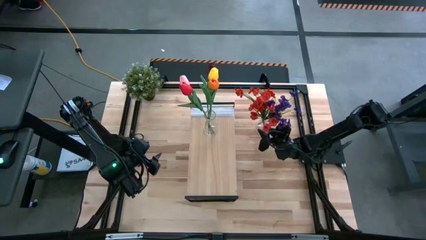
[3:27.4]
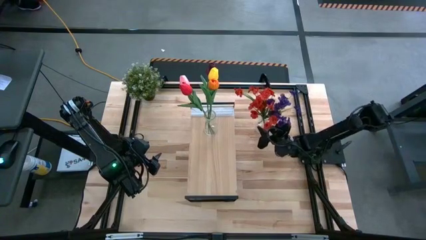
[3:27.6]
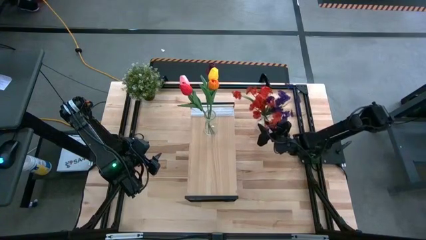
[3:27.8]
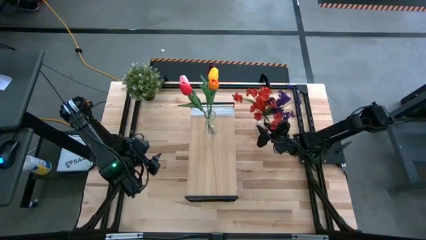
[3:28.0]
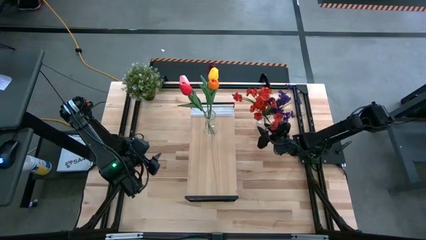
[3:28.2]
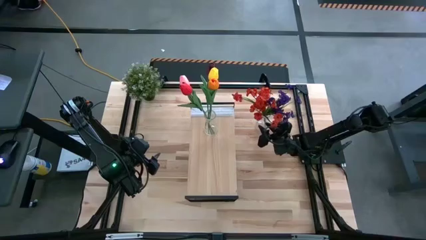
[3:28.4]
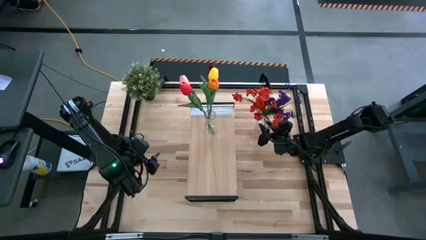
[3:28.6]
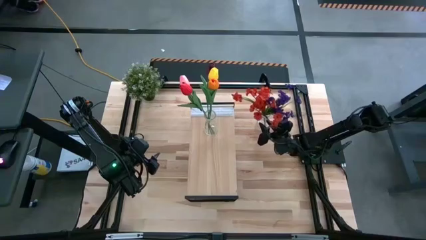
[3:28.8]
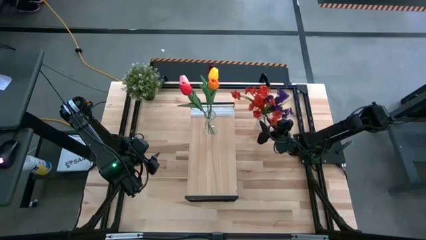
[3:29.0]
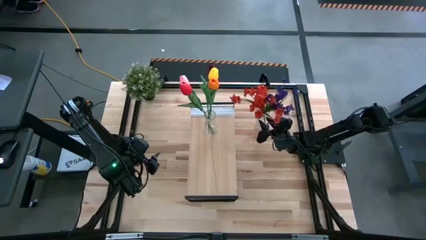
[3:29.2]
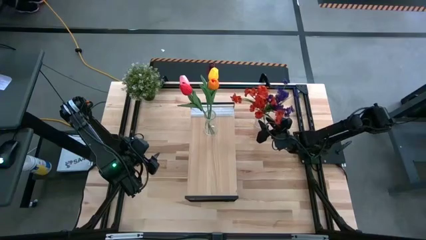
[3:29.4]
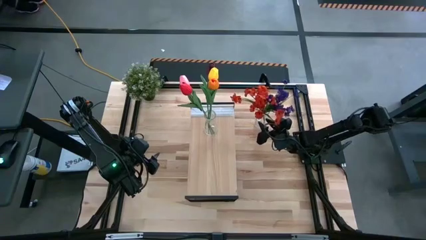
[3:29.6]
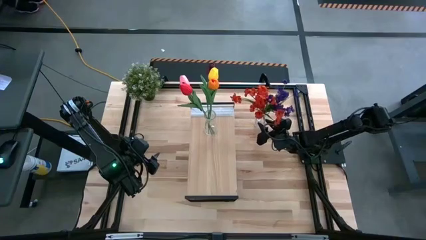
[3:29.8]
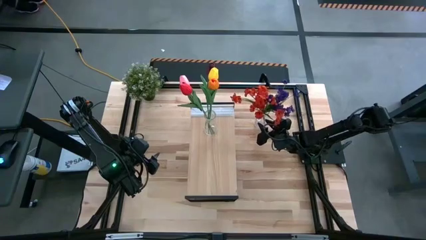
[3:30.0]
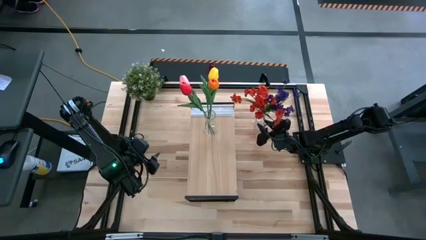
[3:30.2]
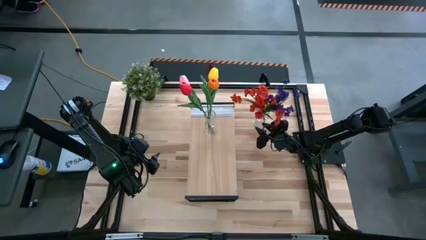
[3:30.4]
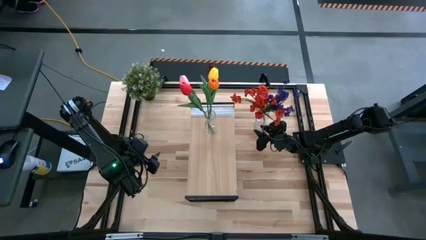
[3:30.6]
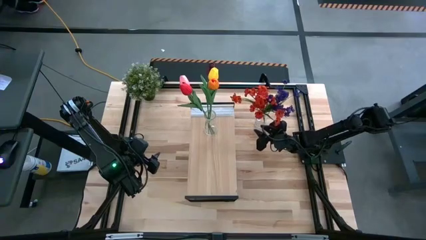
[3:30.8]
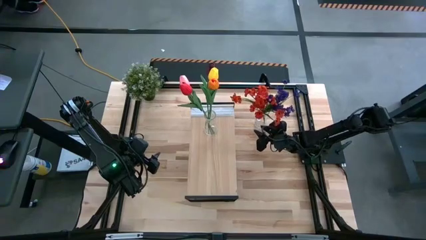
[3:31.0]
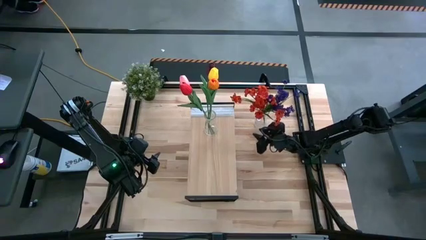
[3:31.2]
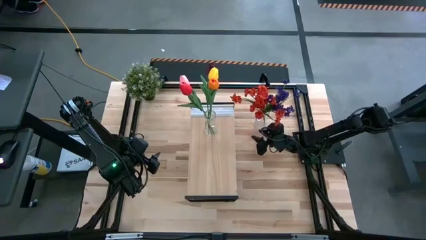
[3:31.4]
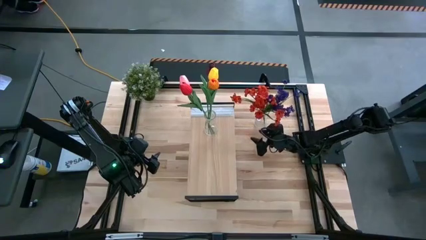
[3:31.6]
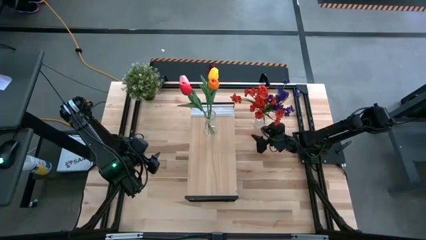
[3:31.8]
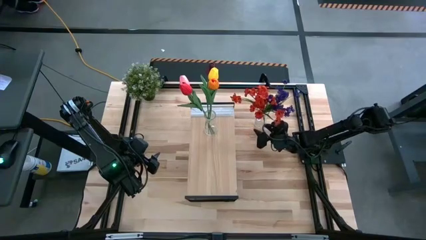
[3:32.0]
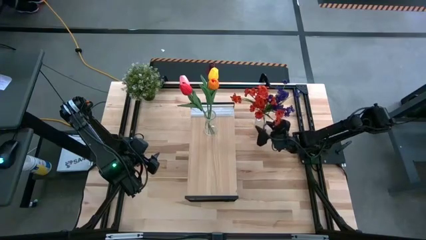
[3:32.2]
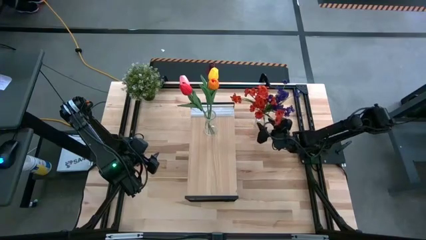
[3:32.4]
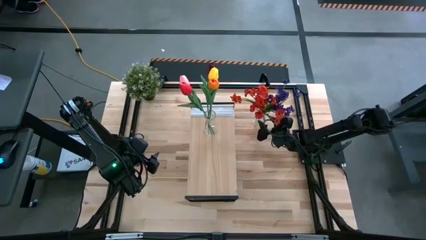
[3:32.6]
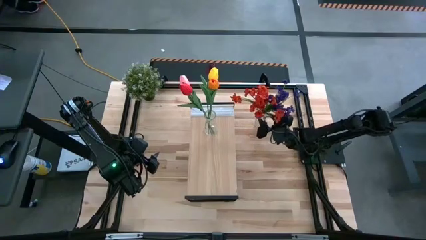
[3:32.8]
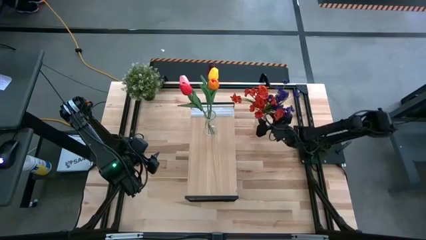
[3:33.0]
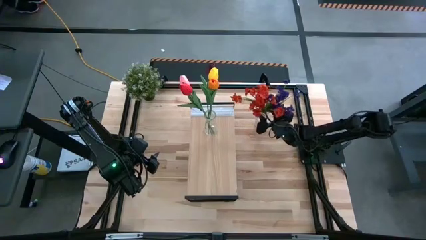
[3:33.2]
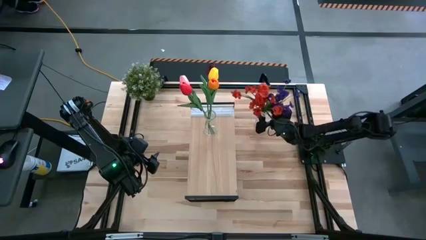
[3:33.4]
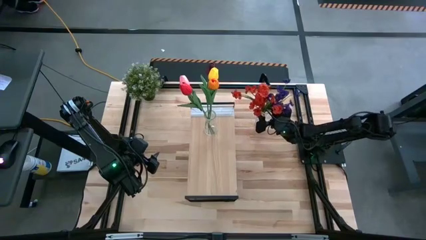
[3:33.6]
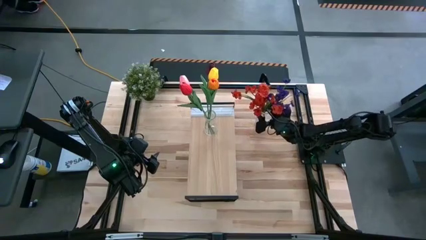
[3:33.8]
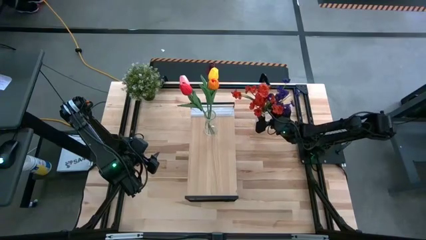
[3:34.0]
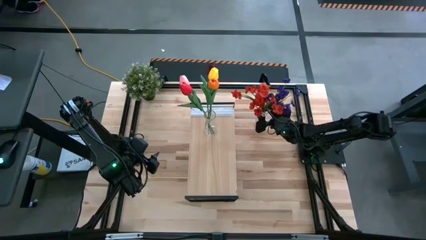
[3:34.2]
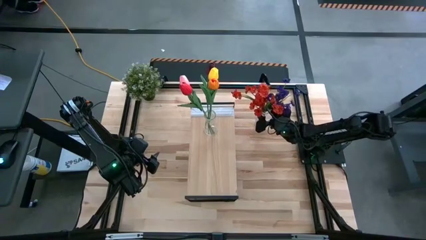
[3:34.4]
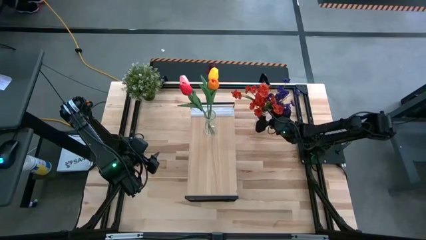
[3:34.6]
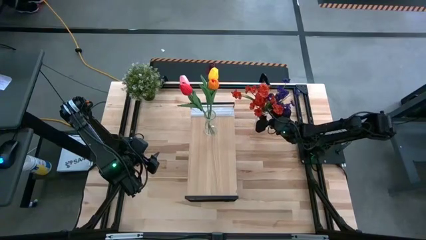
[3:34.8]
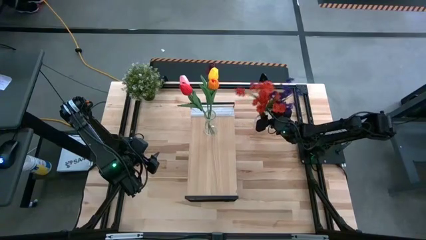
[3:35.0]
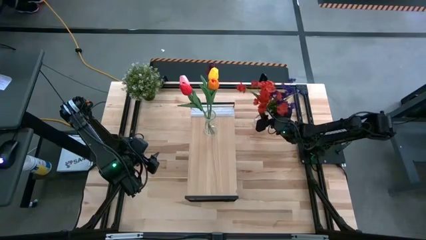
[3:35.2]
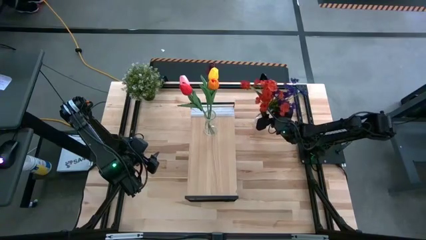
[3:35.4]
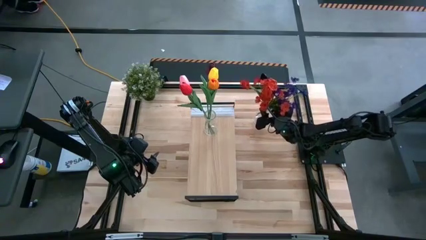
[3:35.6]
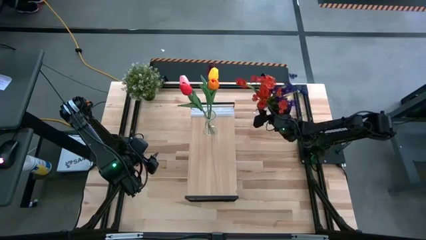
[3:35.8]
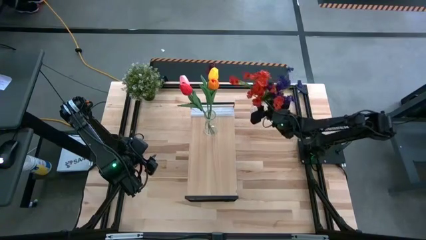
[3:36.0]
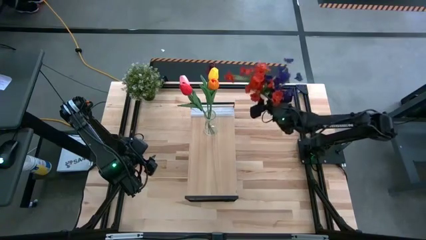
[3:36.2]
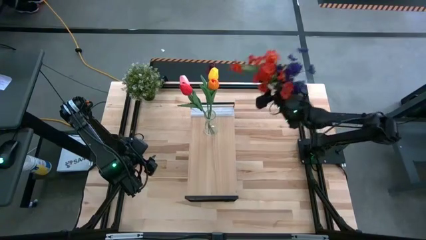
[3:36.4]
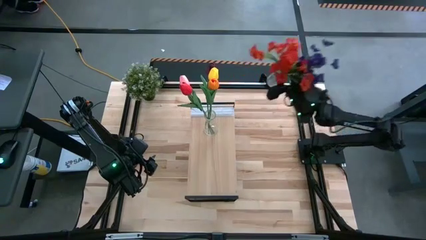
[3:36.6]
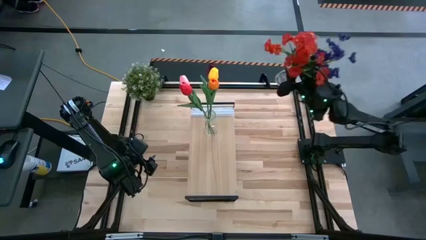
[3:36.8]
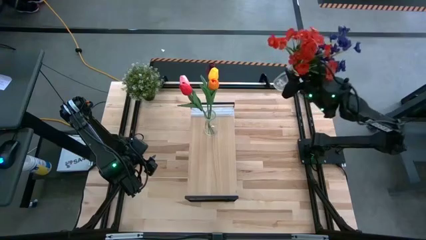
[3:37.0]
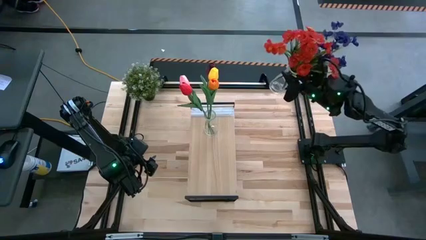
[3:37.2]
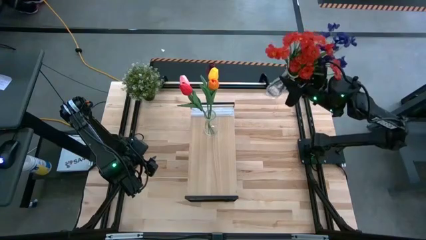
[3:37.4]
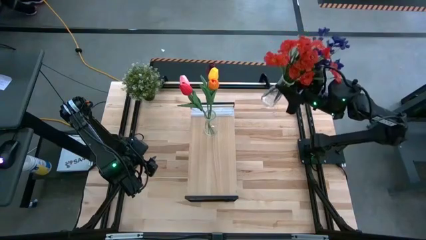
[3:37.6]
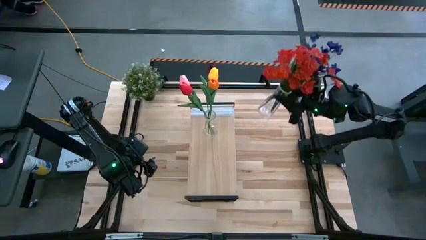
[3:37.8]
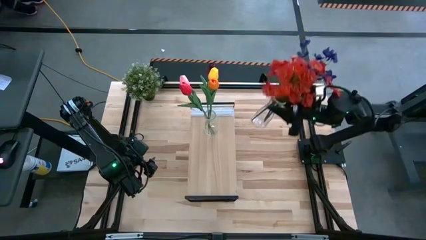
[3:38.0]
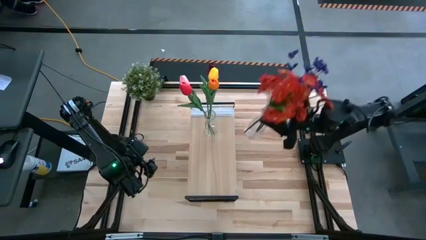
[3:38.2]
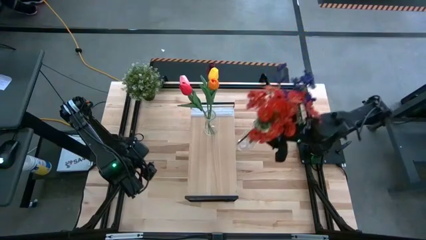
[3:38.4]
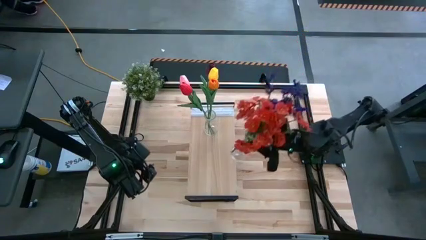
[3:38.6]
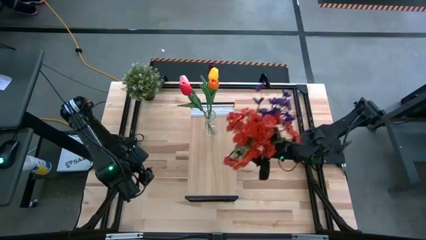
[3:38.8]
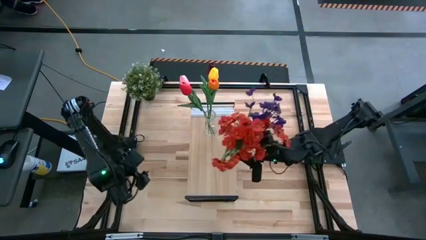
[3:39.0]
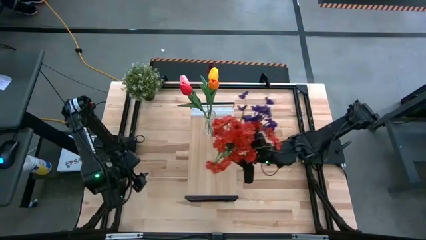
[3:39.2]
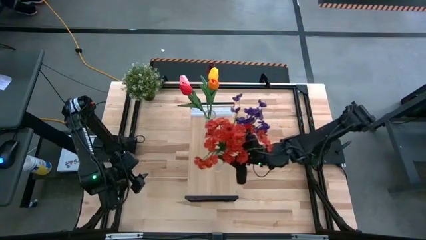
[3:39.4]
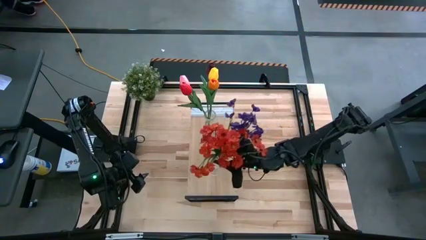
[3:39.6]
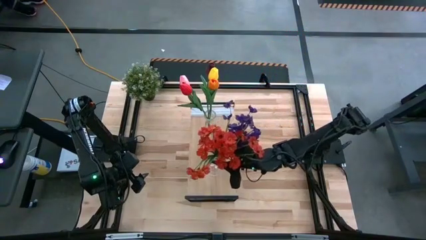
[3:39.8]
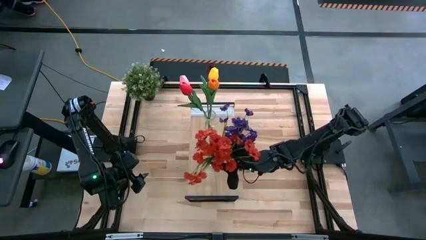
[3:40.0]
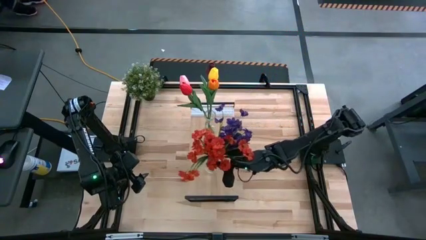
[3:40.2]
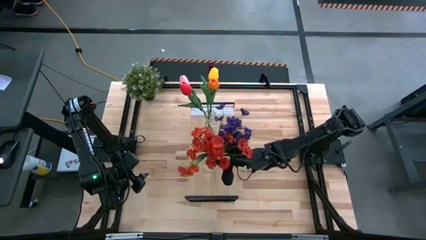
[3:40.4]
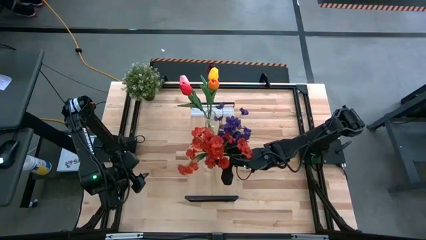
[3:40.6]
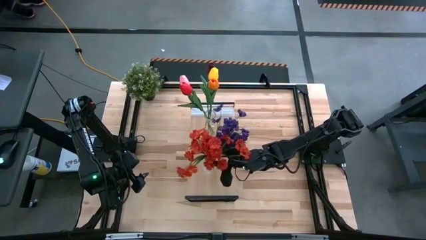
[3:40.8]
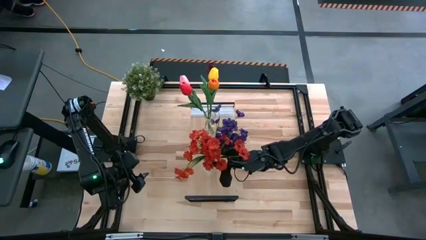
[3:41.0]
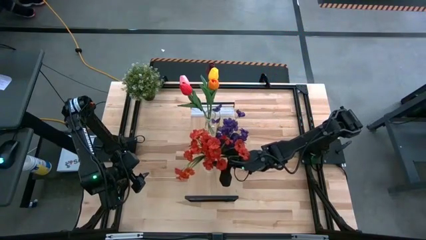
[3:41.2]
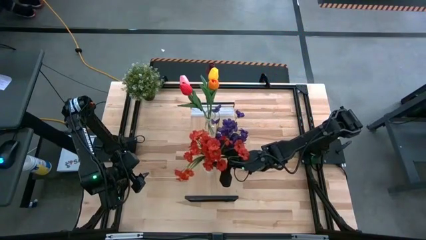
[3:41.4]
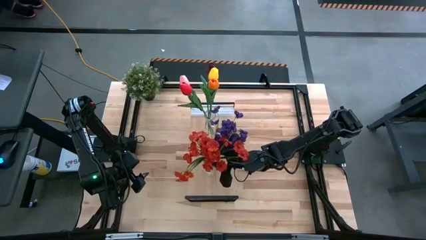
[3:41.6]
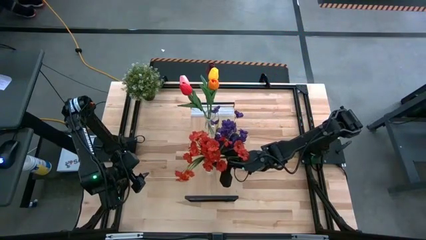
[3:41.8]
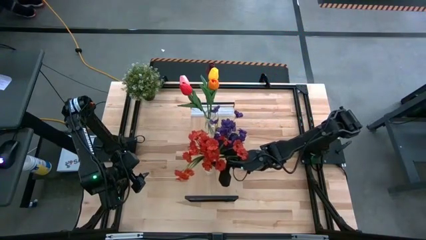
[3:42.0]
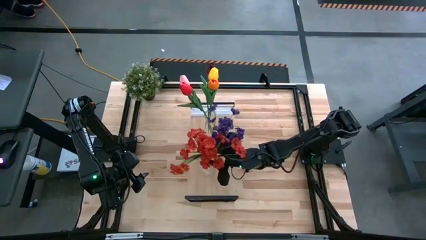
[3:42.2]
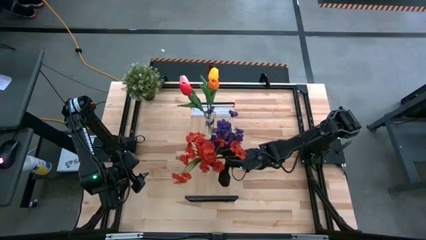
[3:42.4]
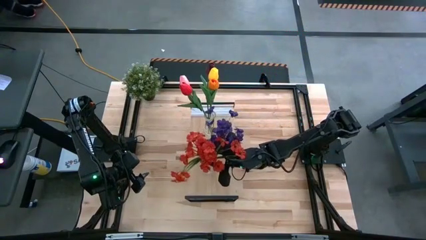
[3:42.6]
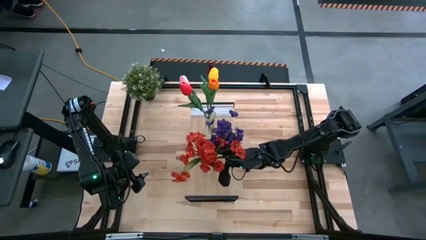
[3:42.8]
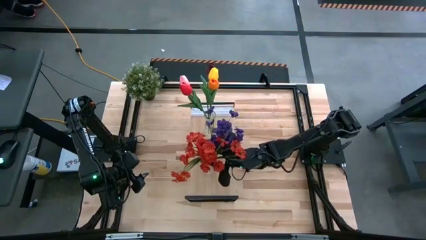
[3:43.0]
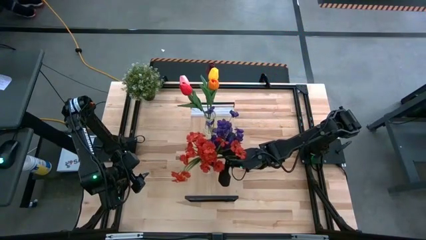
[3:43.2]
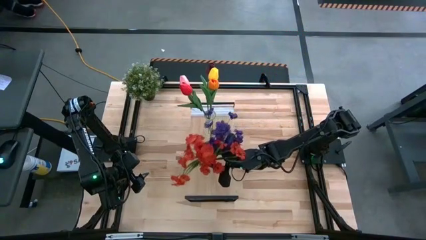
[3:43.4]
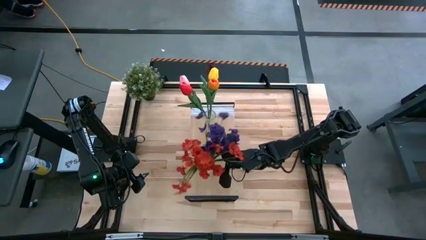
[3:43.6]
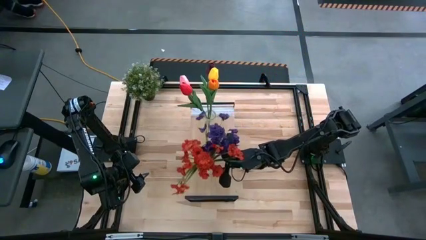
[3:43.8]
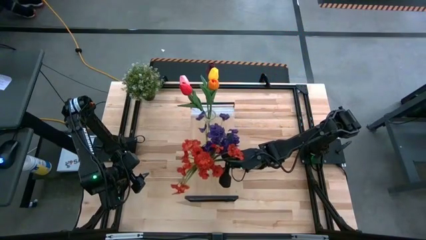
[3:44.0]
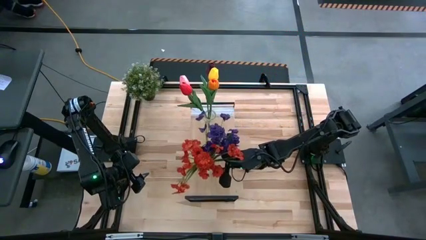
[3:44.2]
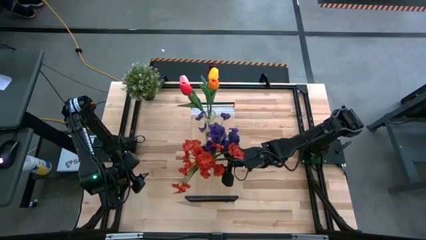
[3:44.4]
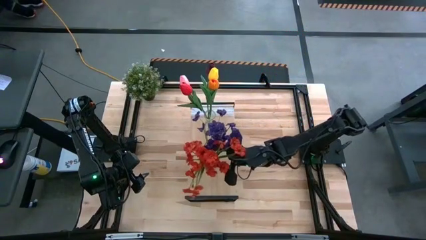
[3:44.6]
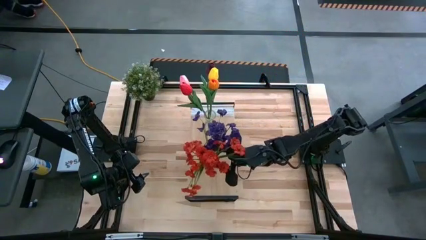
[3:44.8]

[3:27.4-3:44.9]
Task: Pick and place flowers into a vace then onto a shelf
Put the transparent vase with flowers on the shelf
